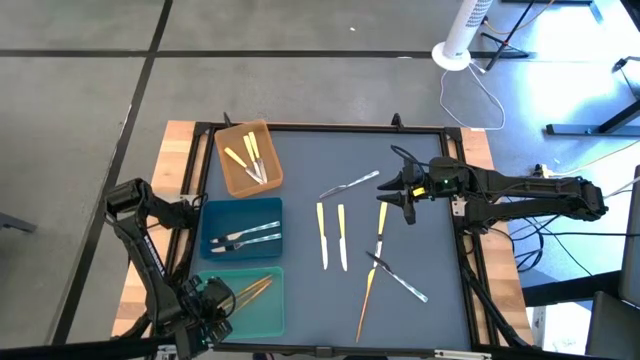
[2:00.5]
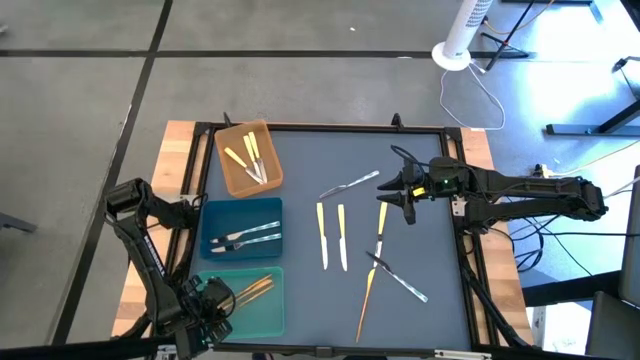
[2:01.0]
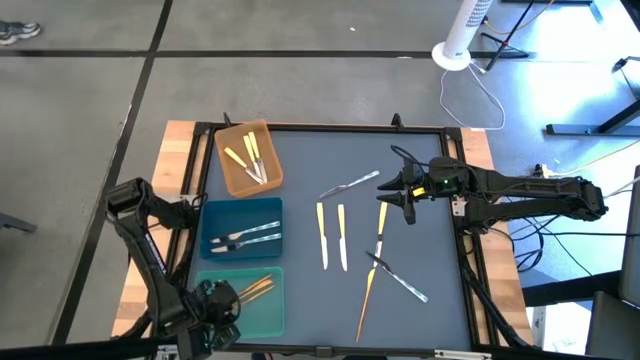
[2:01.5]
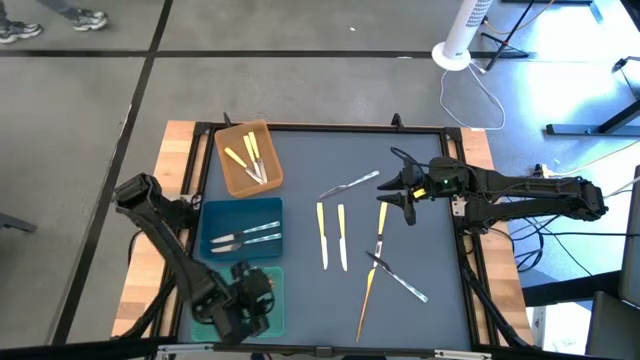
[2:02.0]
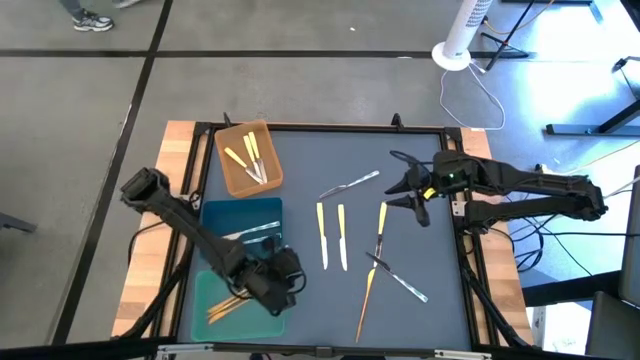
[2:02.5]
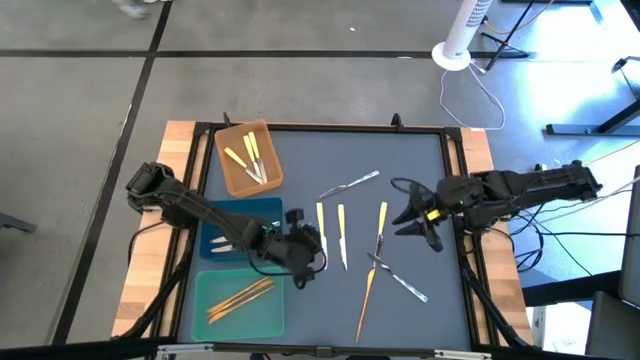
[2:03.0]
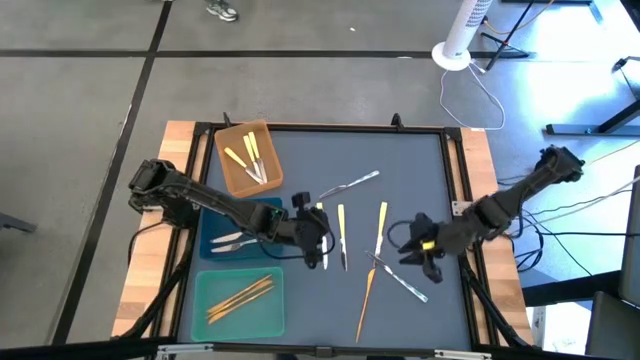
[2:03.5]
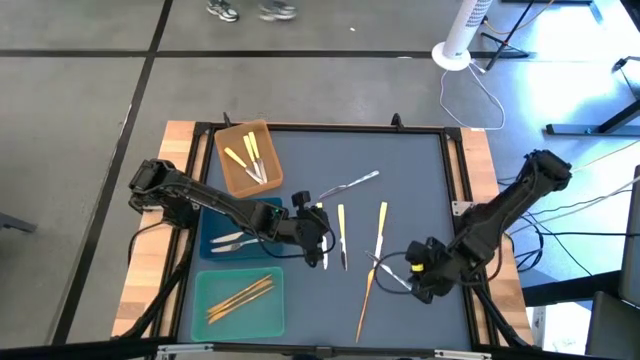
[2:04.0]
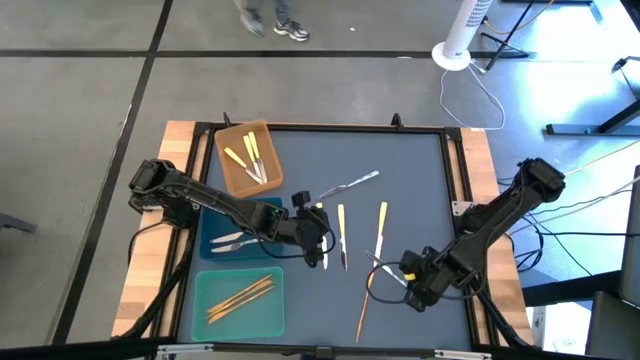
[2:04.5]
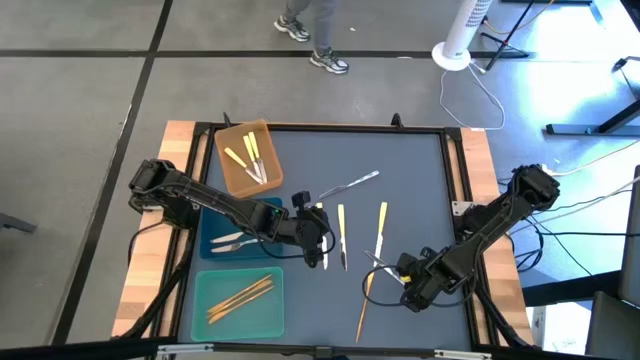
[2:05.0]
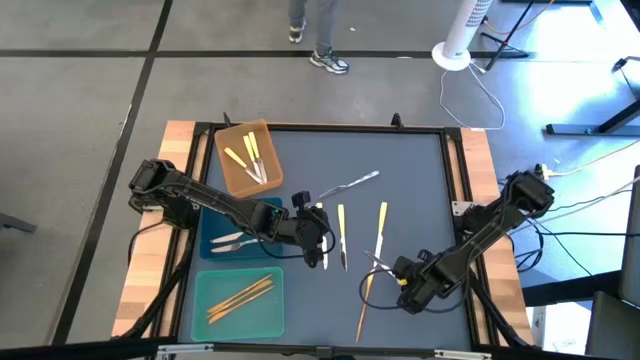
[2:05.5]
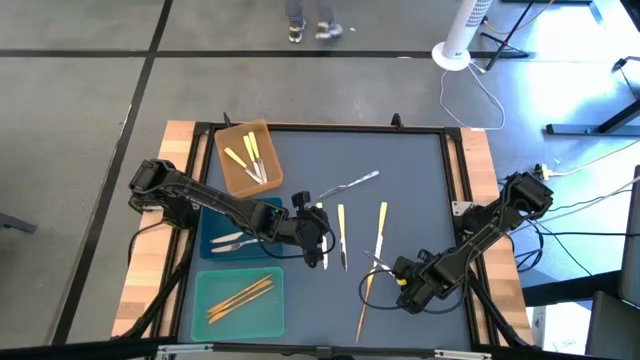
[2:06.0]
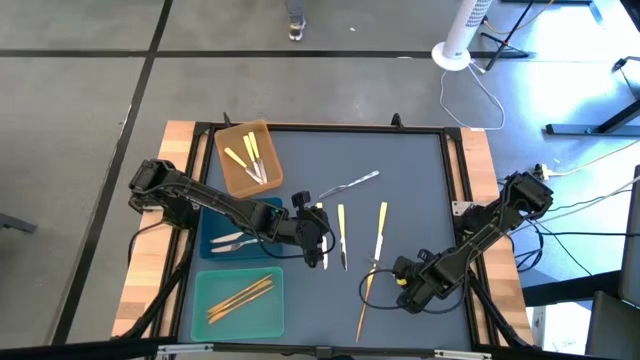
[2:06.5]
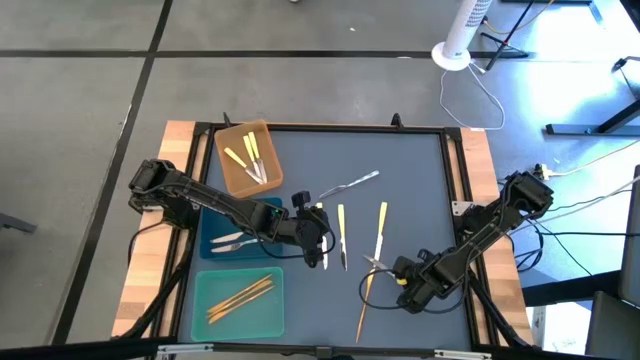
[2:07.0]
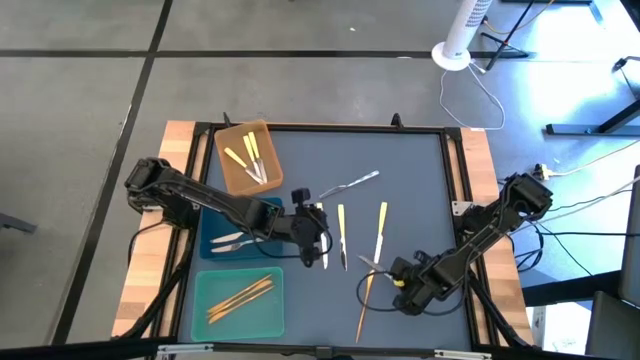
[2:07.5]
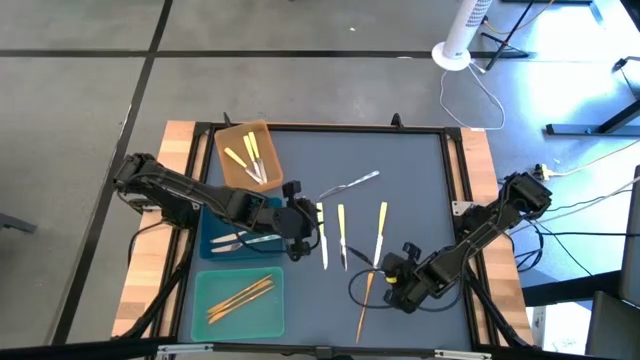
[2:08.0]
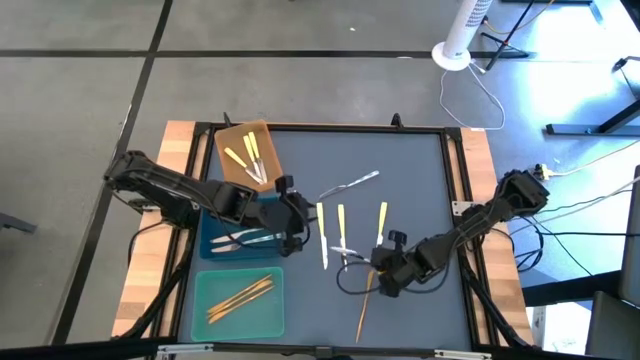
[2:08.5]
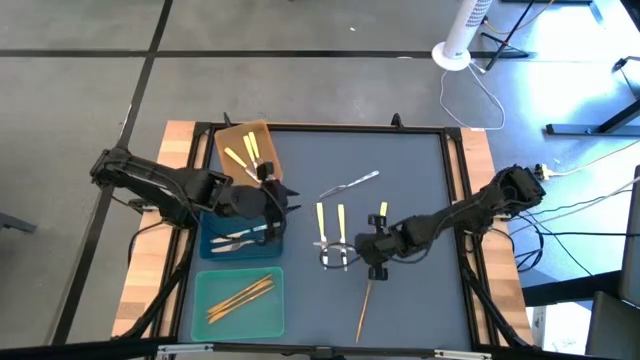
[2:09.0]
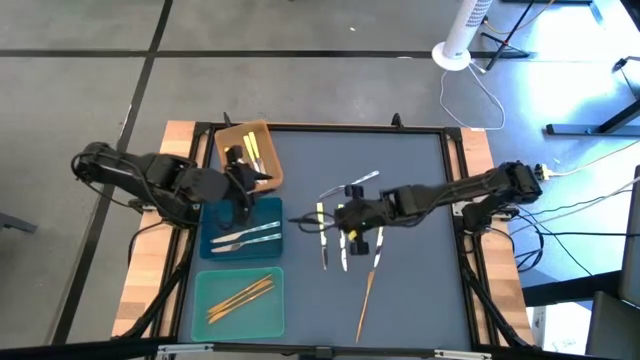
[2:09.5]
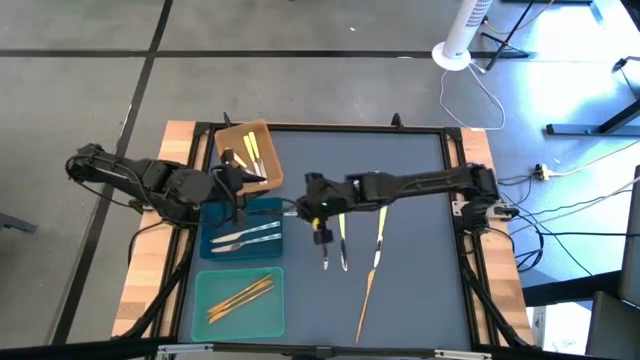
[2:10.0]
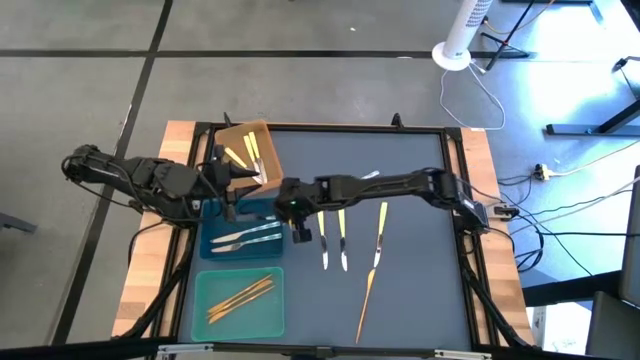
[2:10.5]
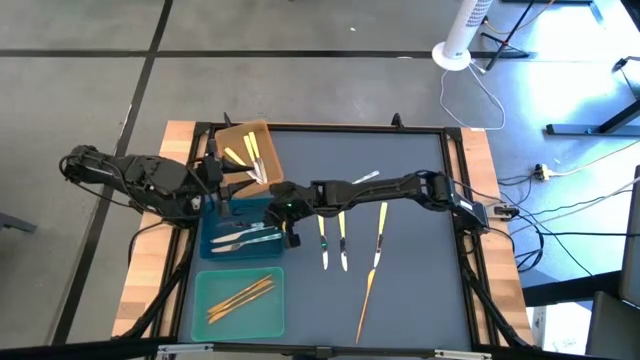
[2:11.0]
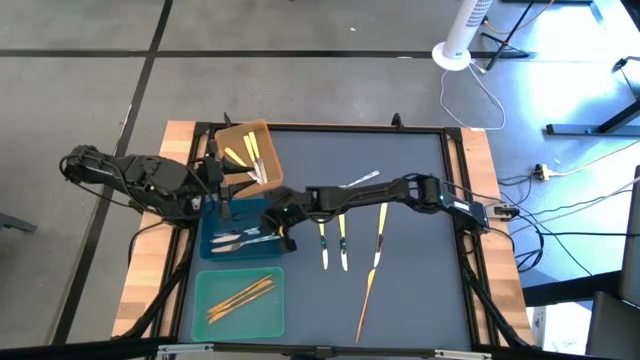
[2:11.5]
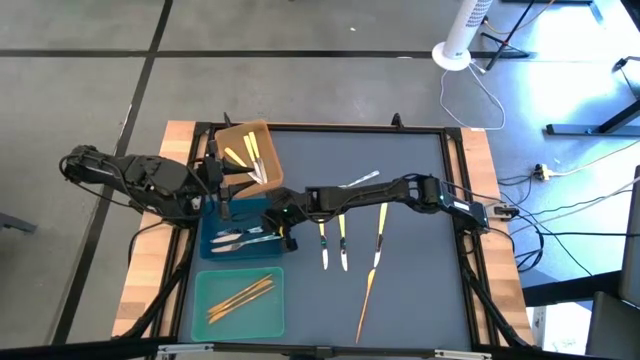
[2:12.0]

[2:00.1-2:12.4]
Task: Sort silverware by color (type)
Put the white-green knife into the blue bin

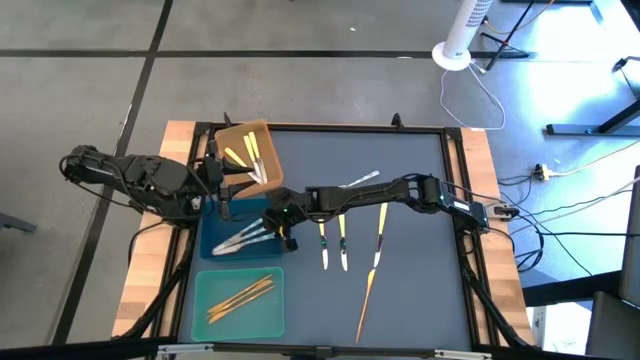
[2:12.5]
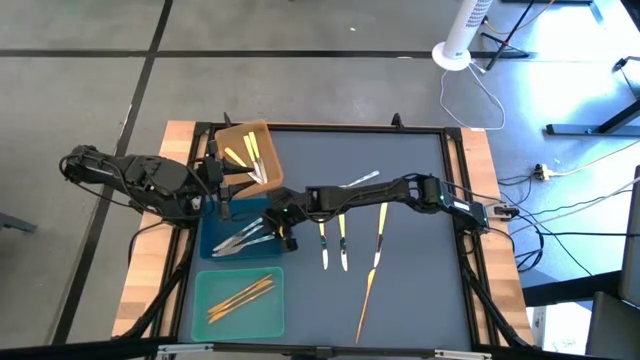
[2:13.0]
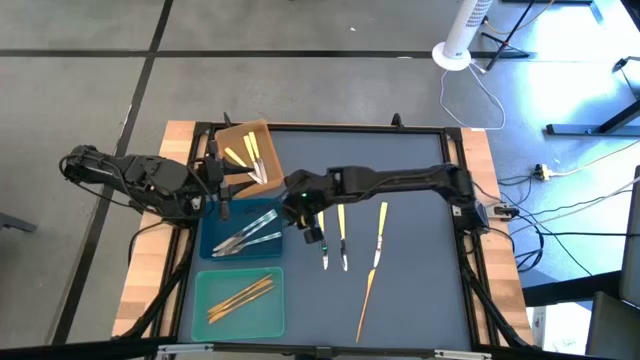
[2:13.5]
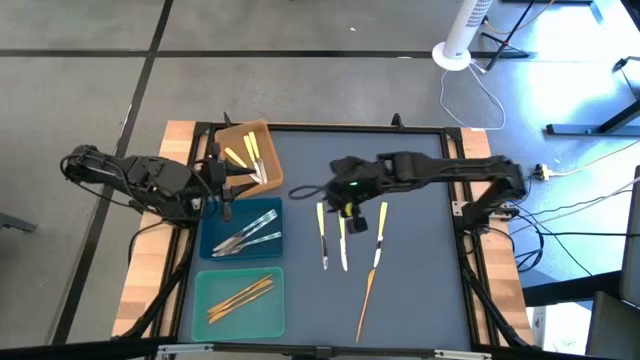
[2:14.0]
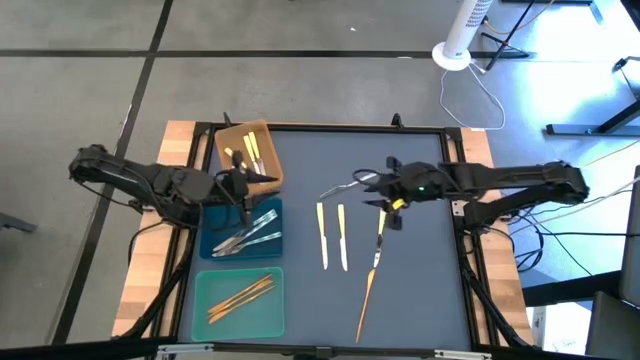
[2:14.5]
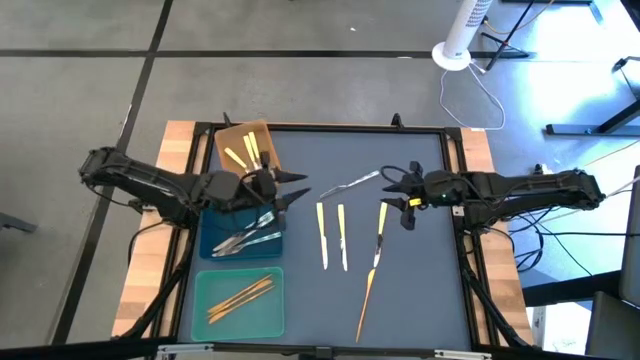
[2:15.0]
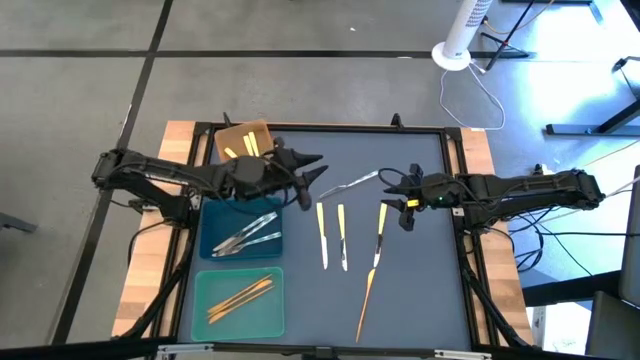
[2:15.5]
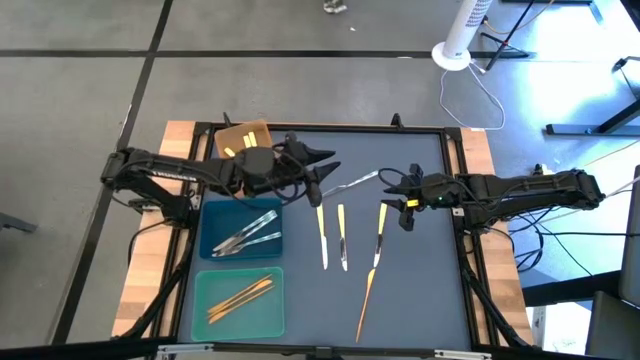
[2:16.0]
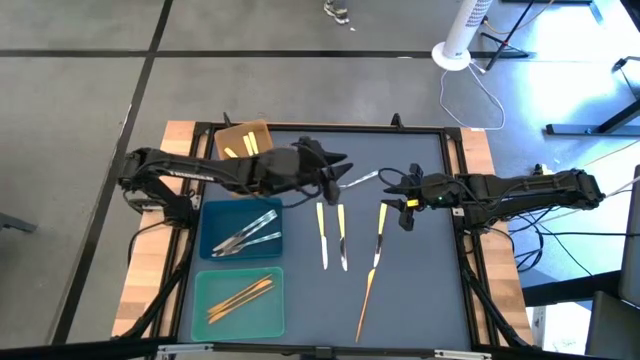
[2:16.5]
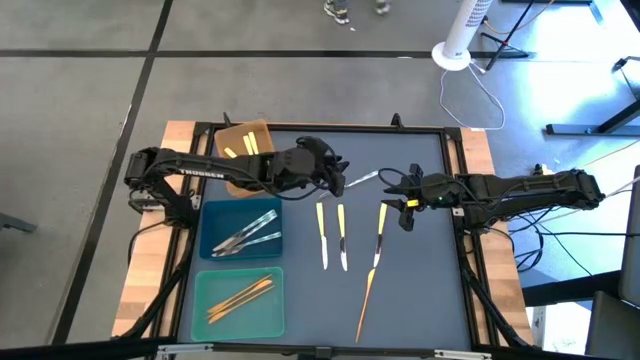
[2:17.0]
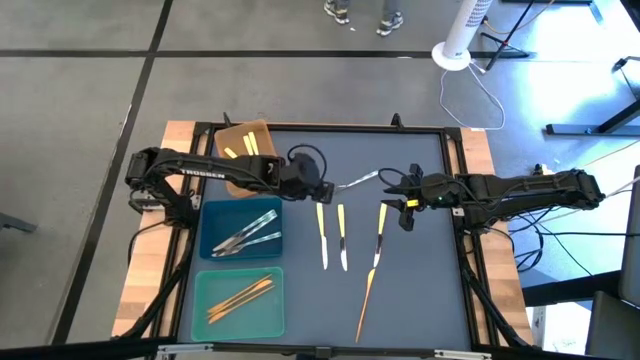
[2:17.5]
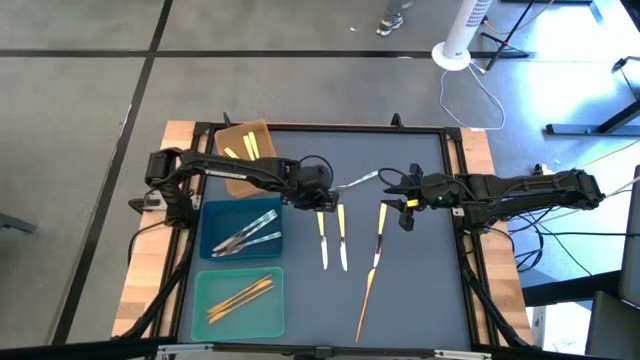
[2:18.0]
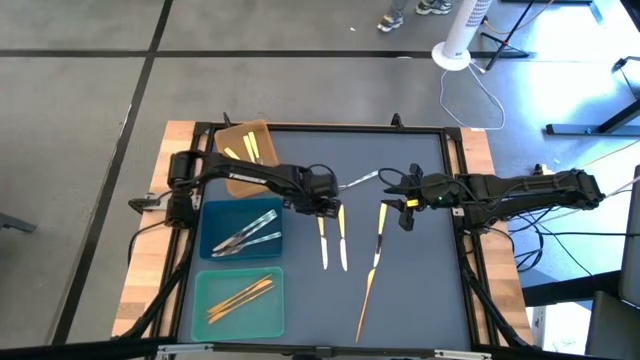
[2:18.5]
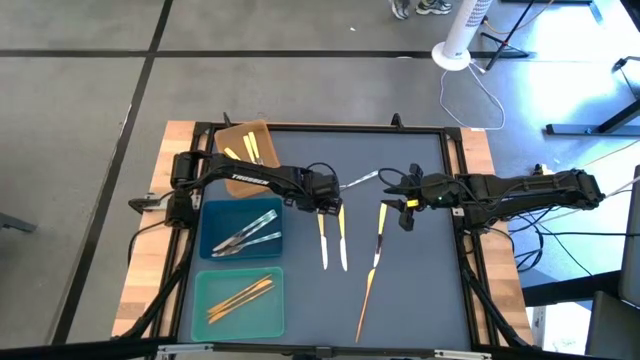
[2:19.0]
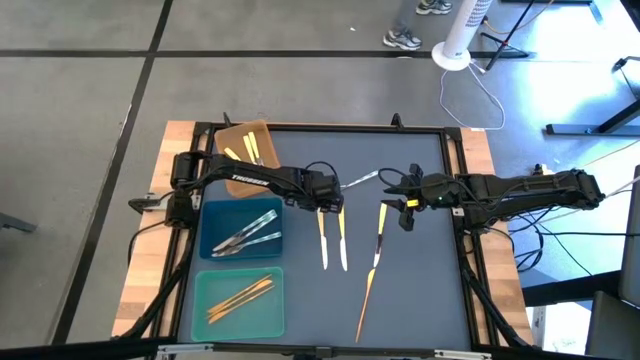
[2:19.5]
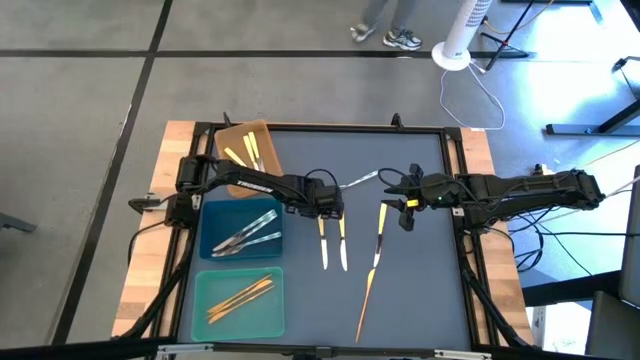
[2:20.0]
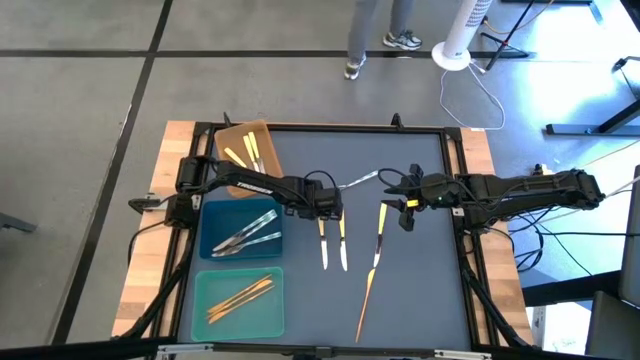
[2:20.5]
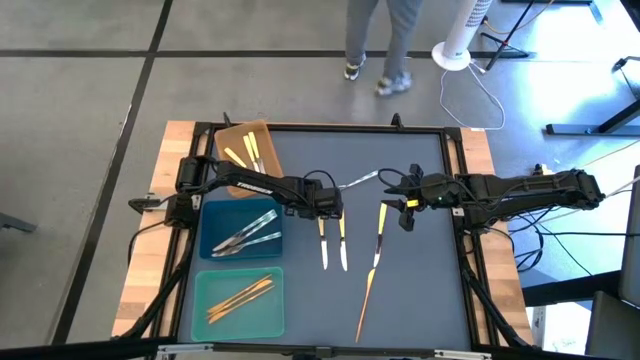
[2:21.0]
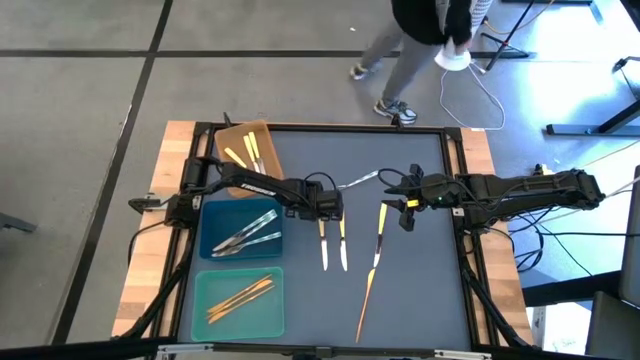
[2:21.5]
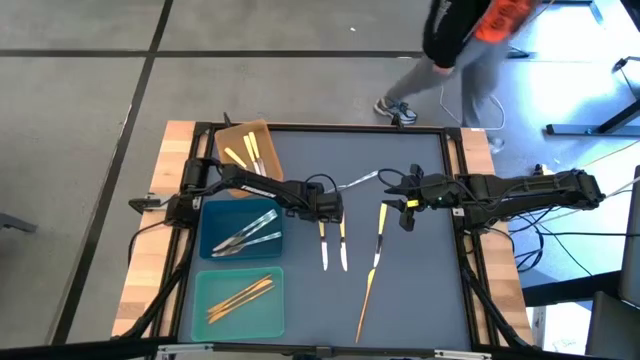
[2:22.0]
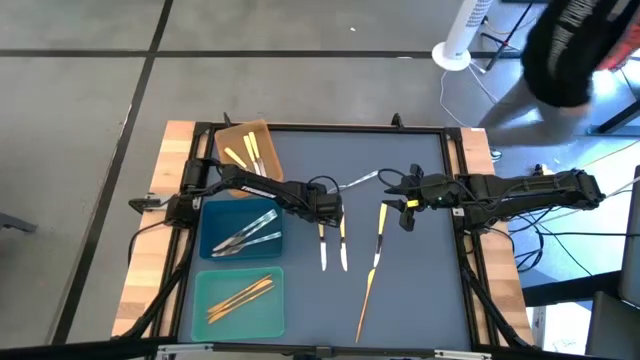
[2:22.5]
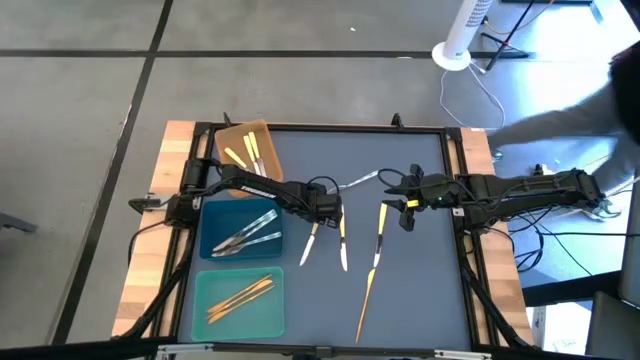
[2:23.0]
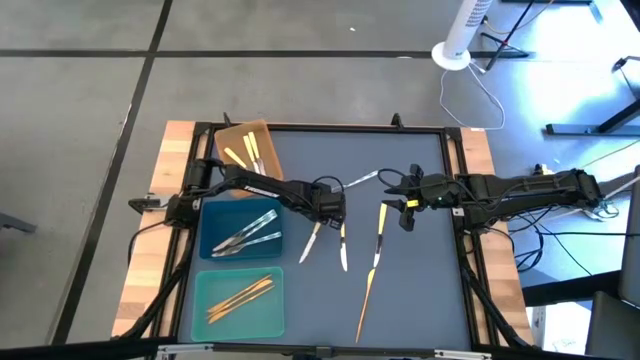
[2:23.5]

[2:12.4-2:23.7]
Put the yellow knife into the orange bin
